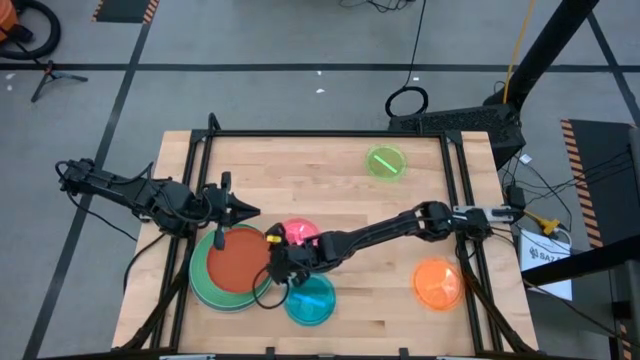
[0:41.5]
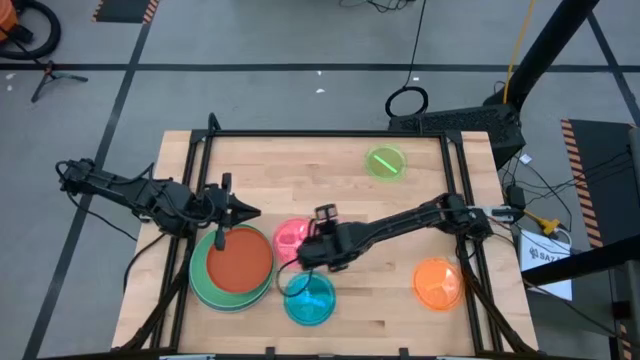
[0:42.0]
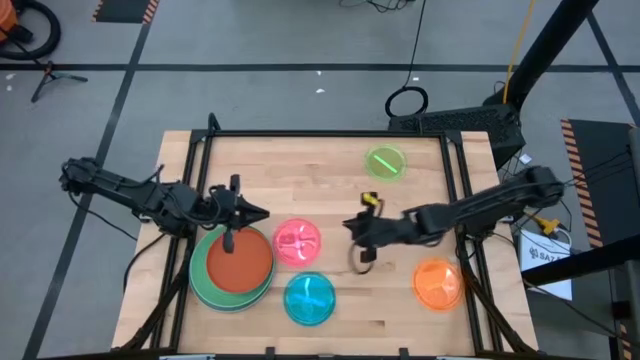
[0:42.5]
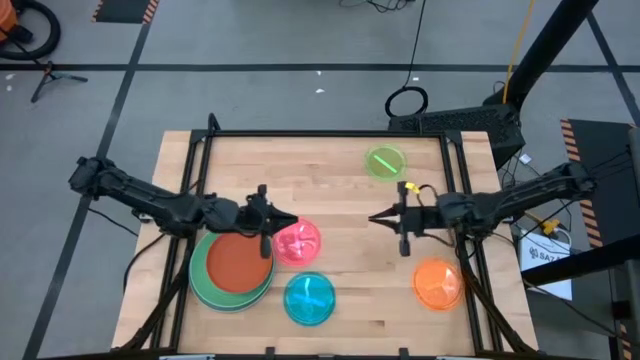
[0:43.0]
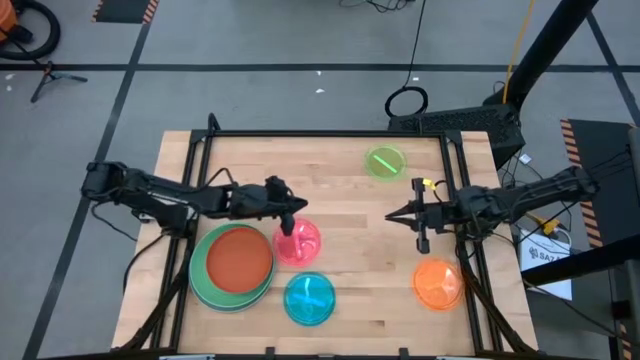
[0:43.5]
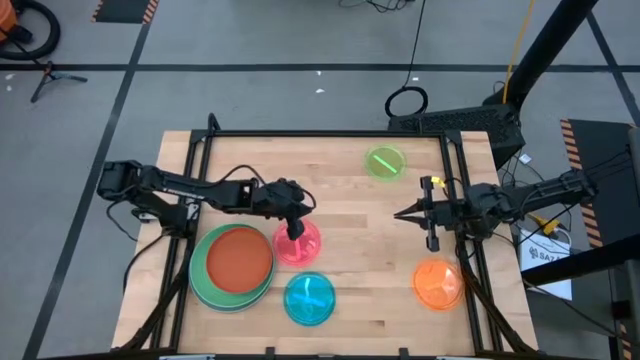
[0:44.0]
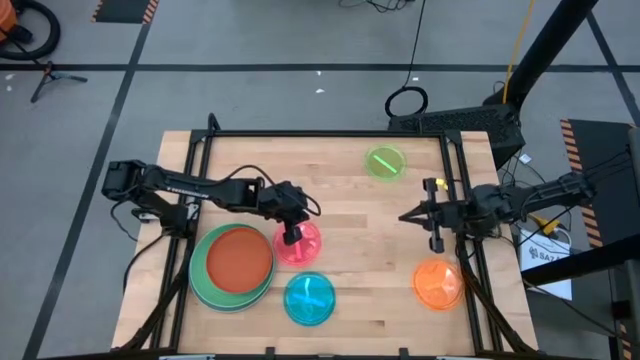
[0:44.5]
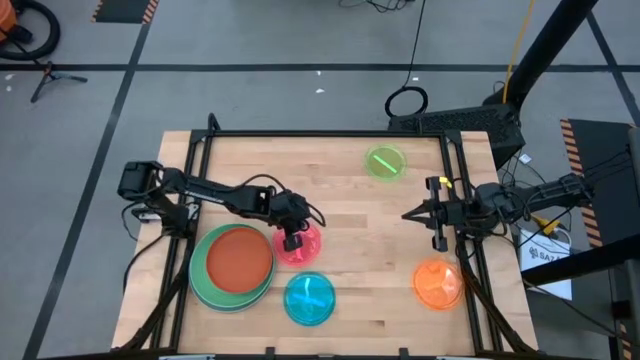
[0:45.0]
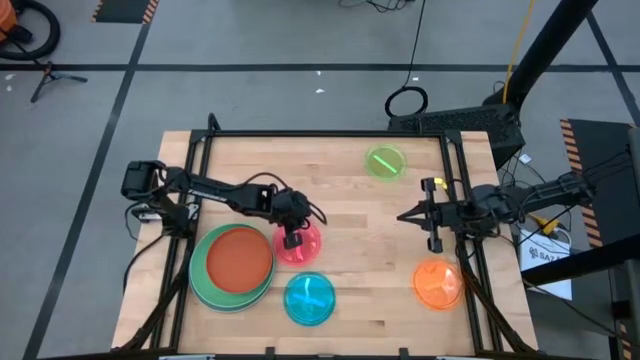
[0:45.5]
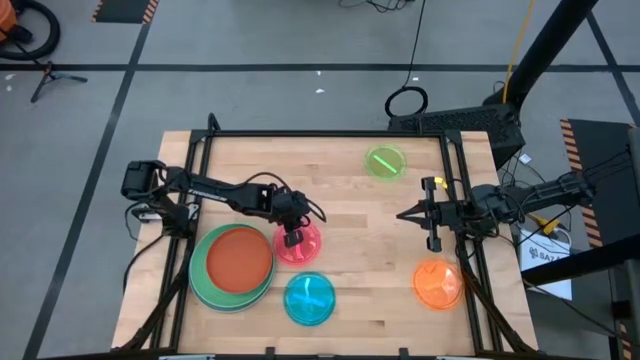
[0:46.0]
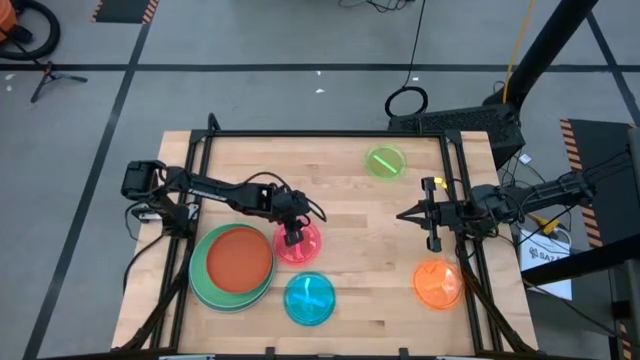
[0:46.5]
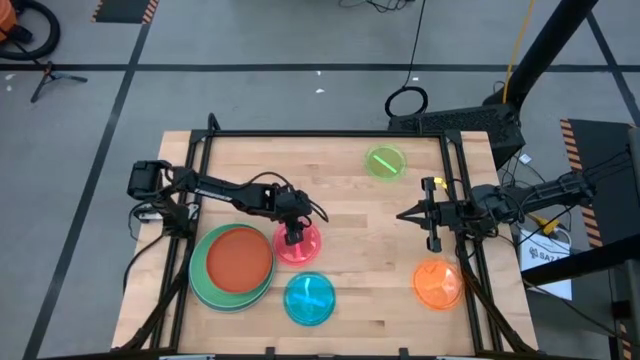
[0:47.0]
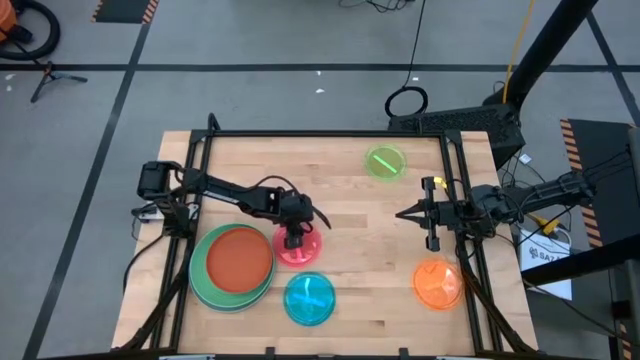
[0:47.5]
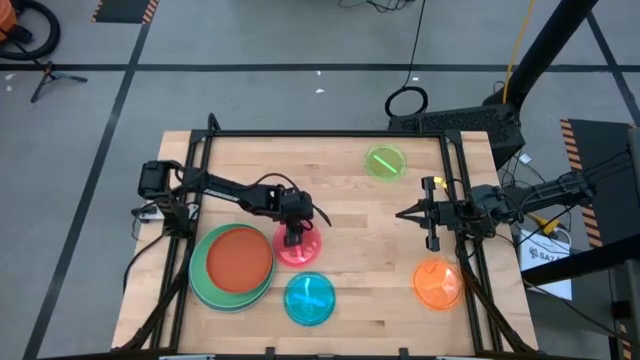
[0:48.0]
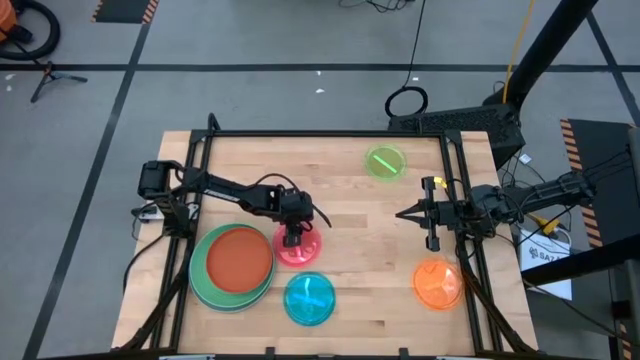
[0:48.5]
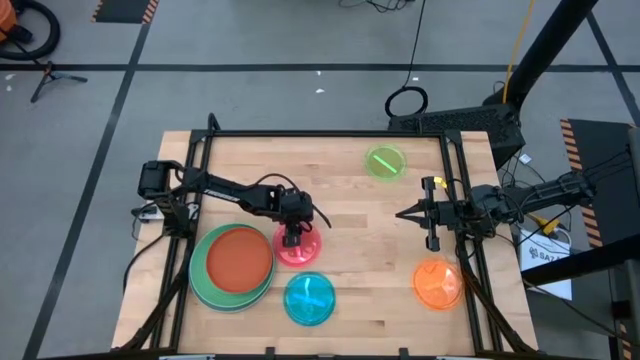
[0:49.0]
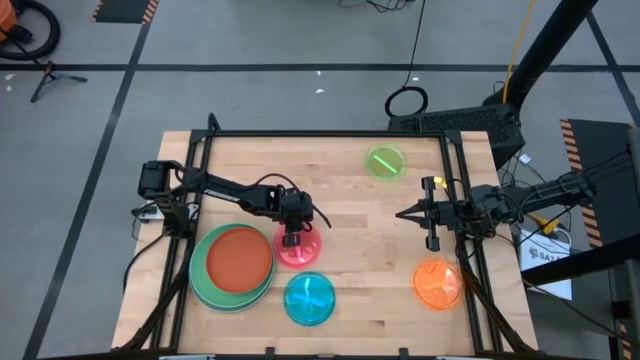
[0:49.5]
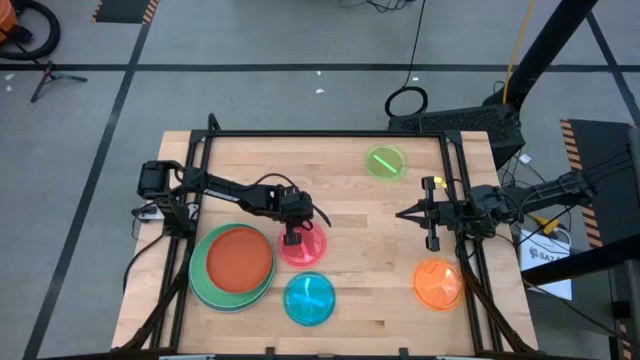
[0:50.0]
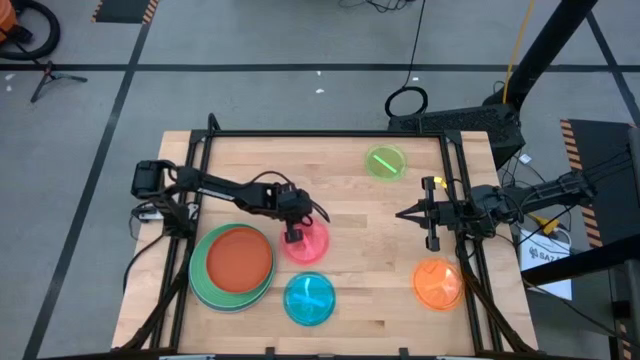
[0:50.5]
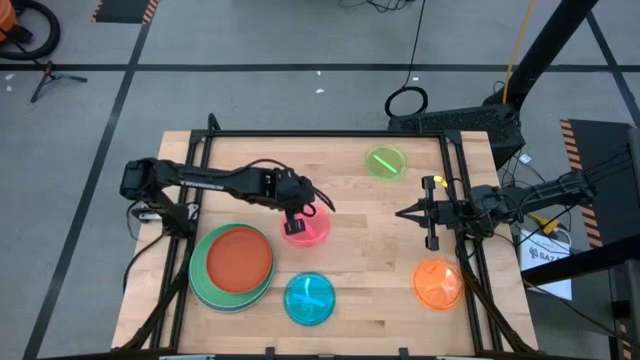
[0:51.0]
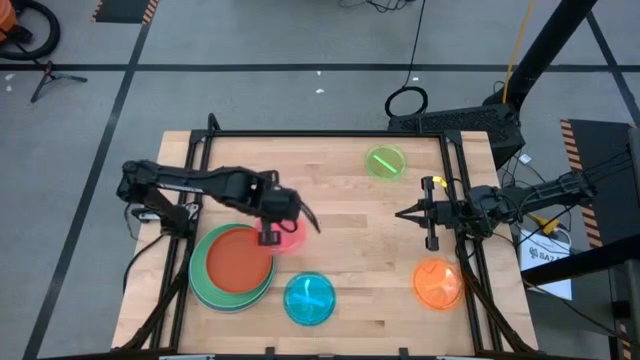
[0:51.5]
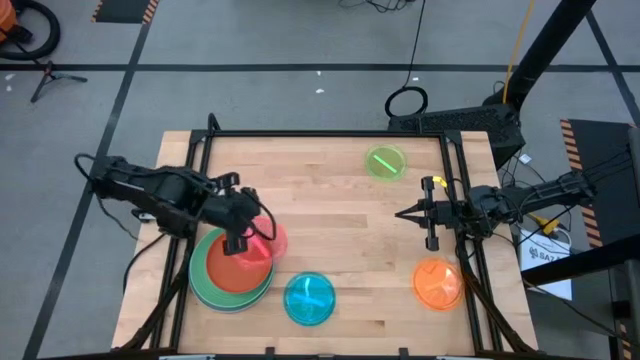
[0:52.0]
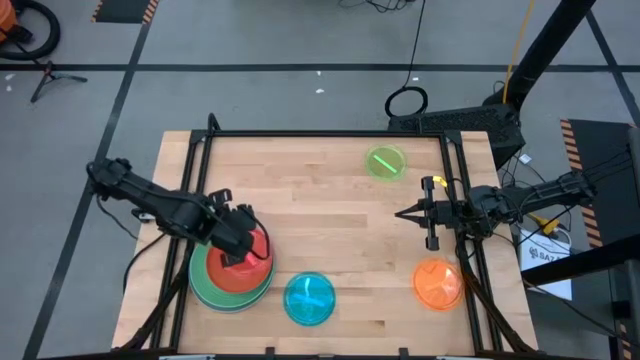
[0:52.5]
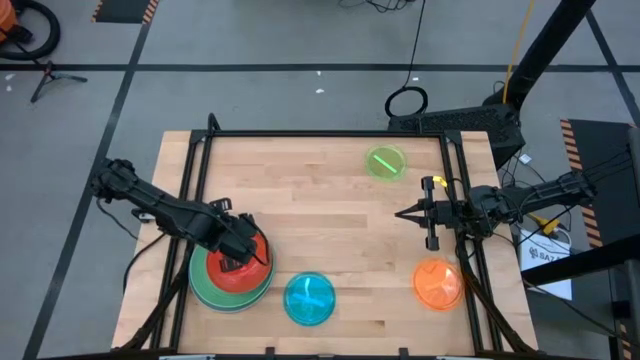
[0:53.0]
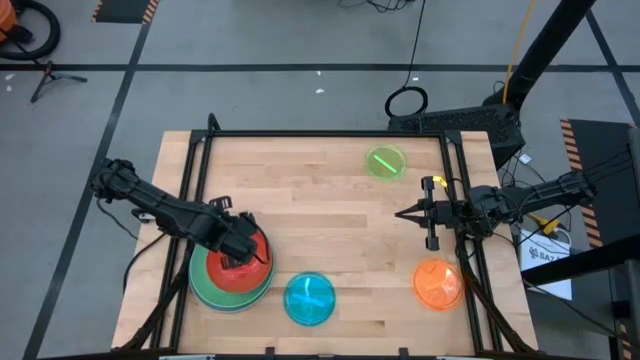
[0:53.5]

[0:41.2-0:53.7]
Task: Stack plastic plates
Stack the pink plate on top of the dark orange plate

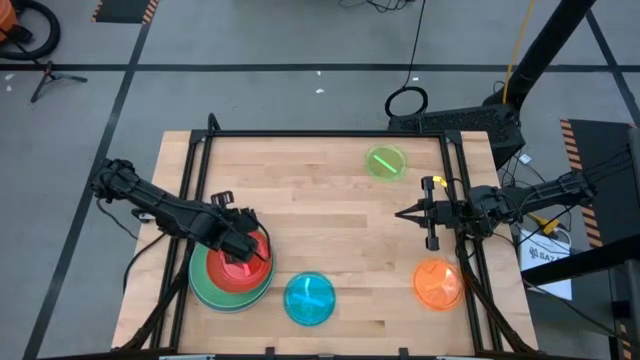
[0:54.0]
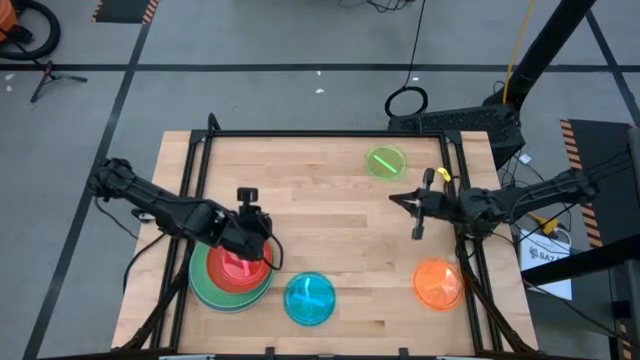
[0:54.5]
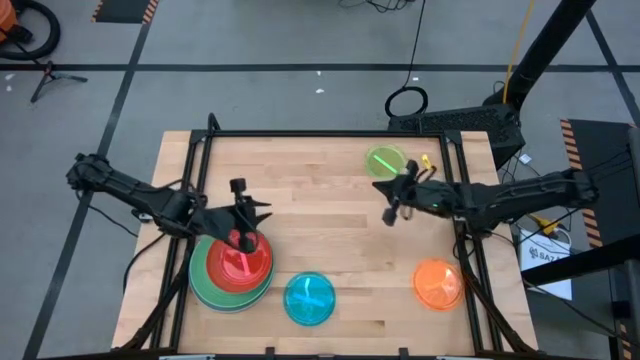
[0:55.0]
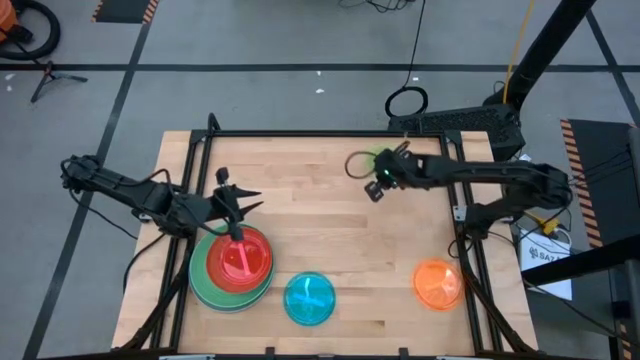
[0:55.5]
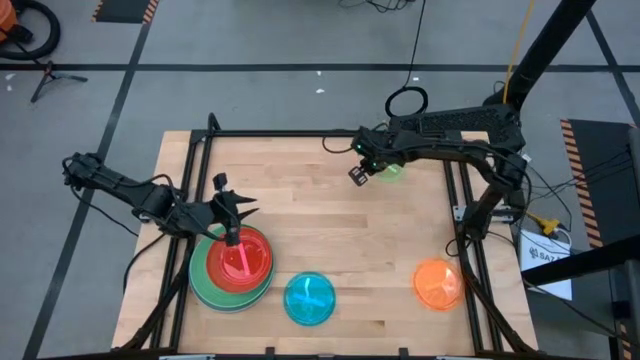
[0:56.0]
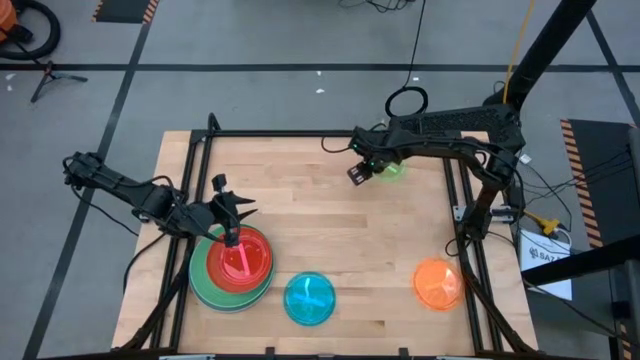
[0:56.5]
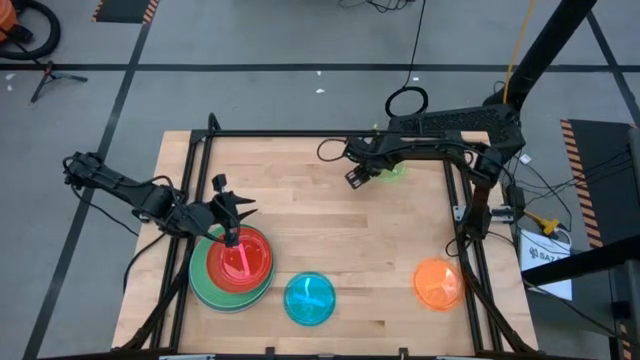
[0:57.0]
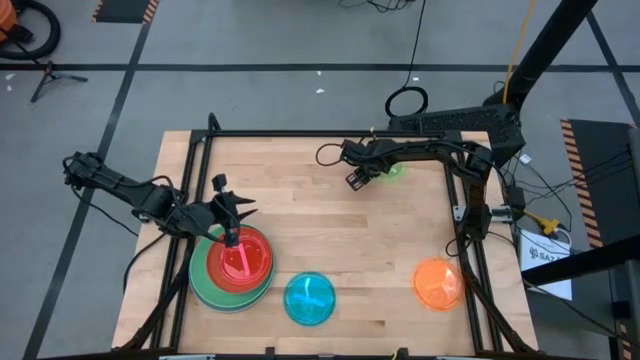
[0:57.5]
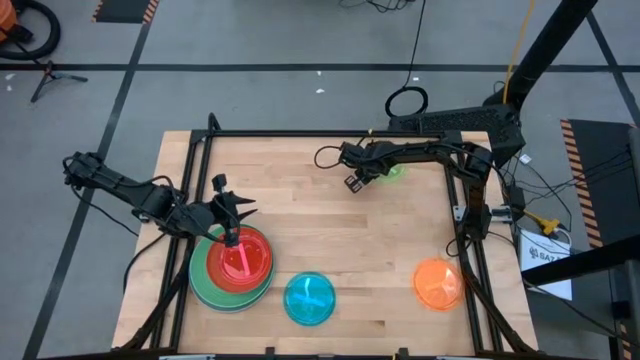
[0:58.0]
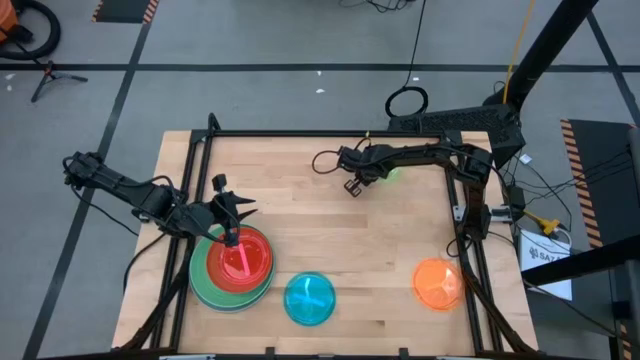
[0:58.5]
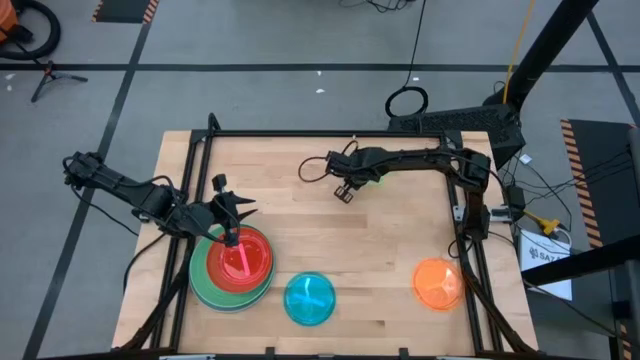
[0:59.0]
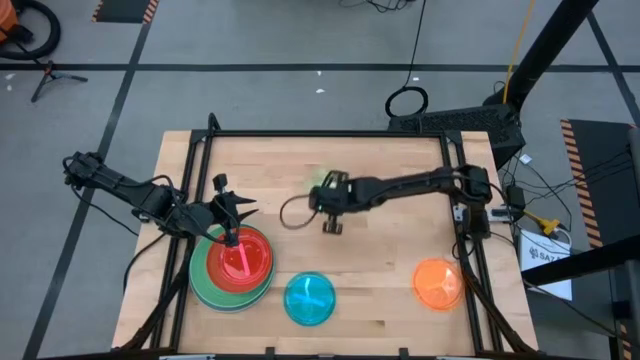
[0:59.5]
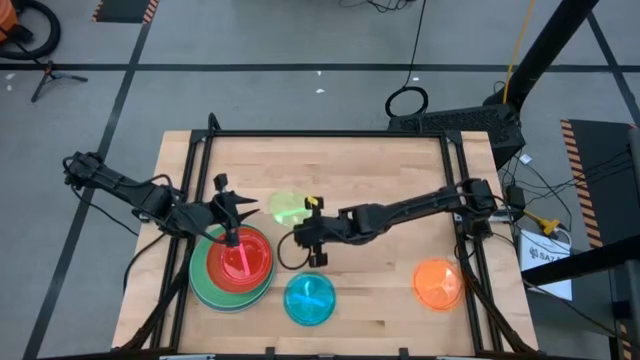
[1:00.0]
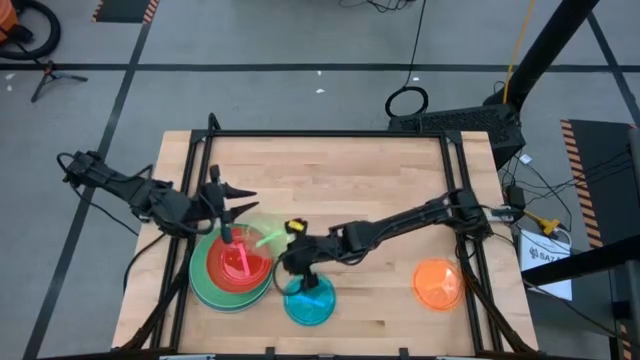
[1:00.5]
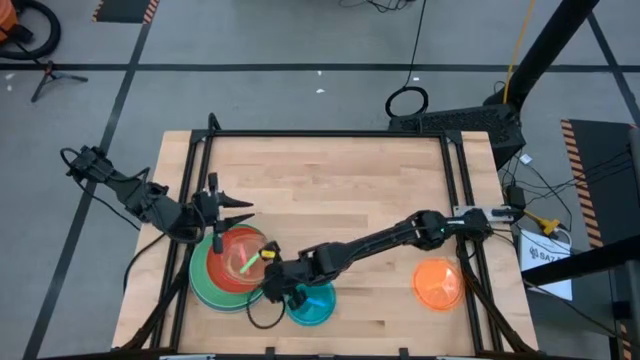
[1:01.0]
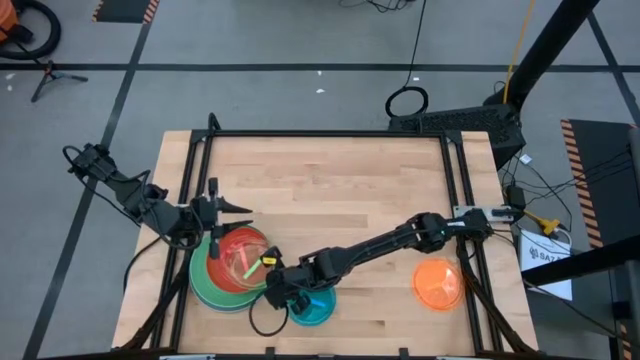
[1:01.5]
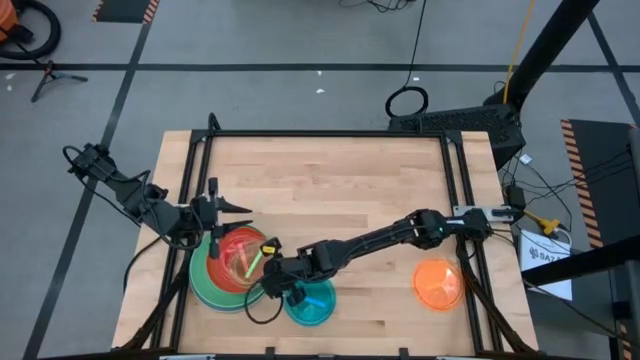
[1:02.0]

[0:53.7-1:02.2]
Stack the light green plate on top of the pink plate

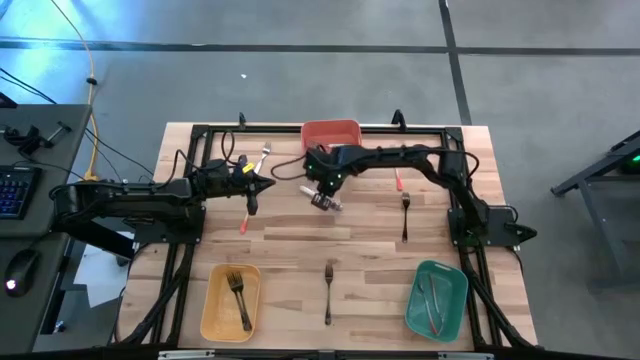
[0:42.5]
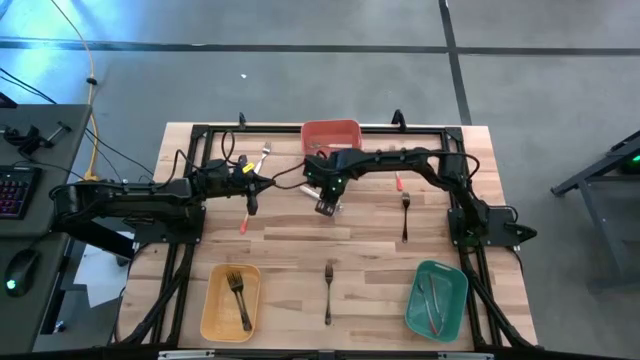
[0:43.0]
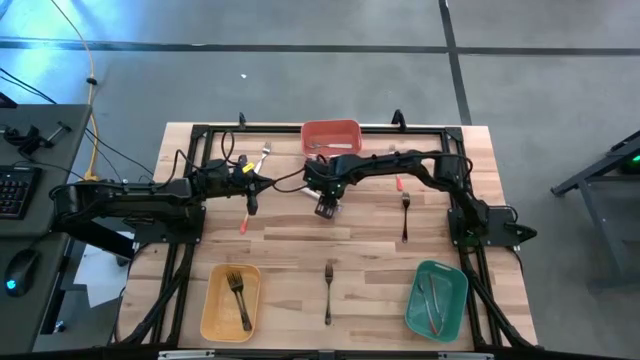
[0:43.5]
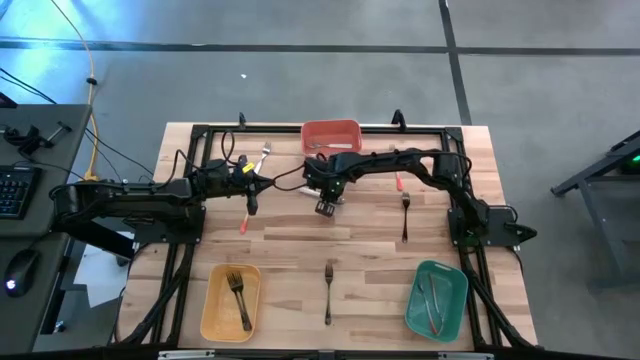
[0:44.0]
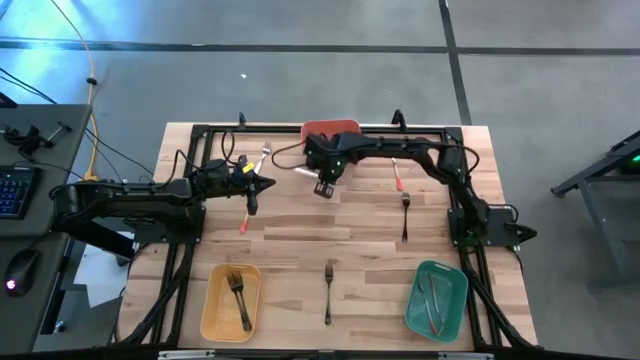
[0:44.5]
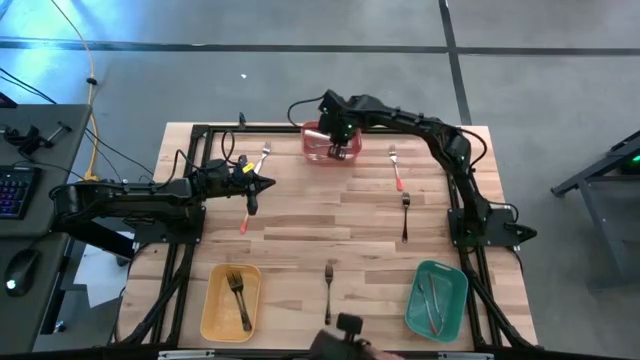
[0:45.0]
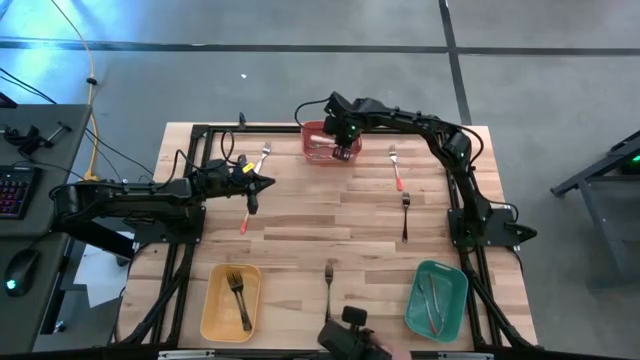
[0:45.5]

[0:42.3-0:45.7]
Task: Sort silverware by color (type)
Put the bottom white fork into the orange bin
